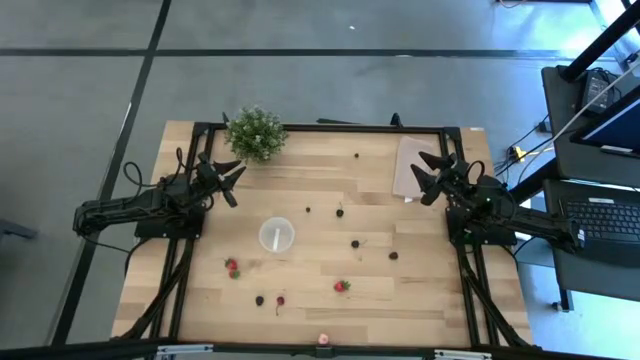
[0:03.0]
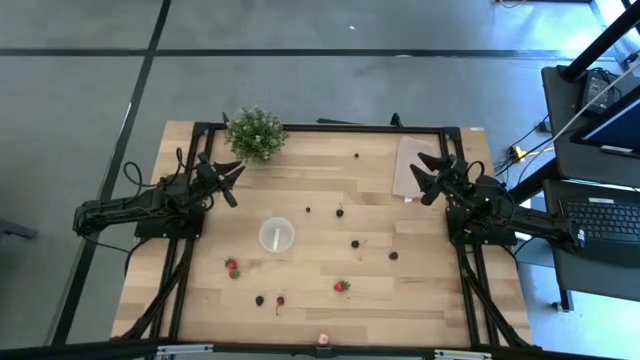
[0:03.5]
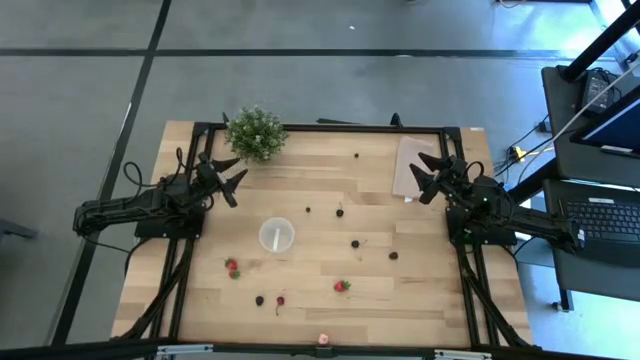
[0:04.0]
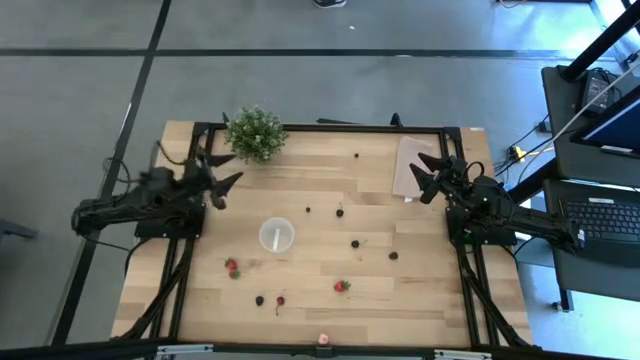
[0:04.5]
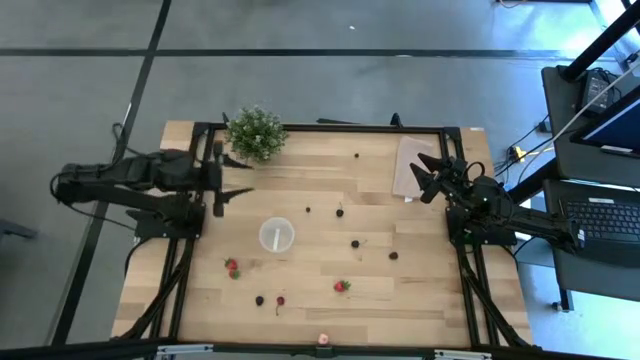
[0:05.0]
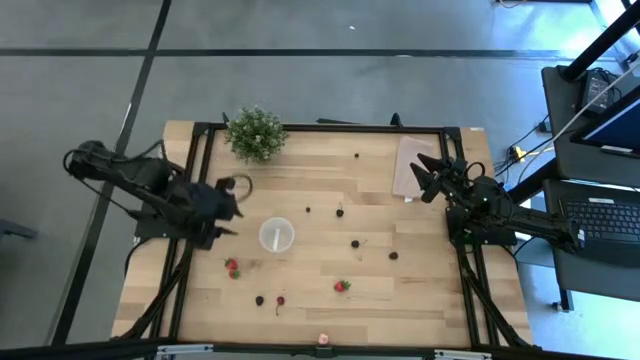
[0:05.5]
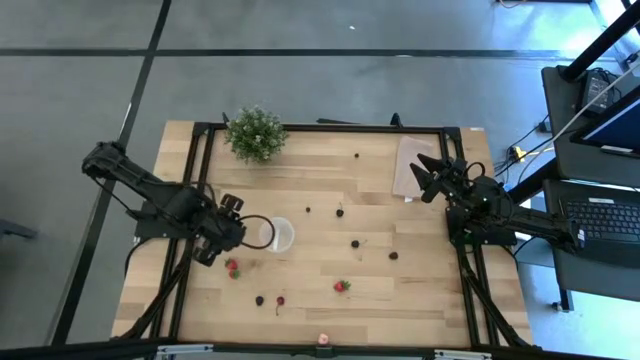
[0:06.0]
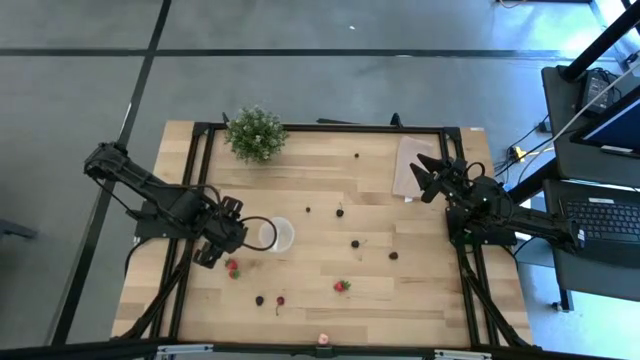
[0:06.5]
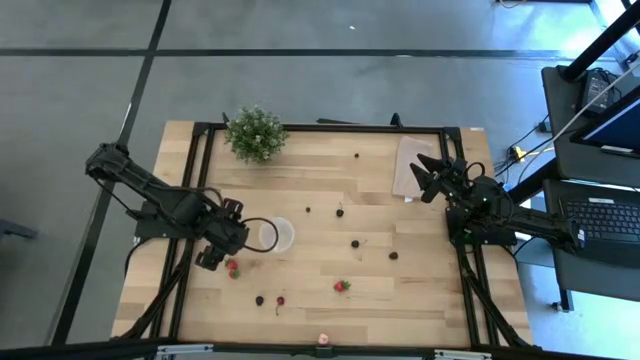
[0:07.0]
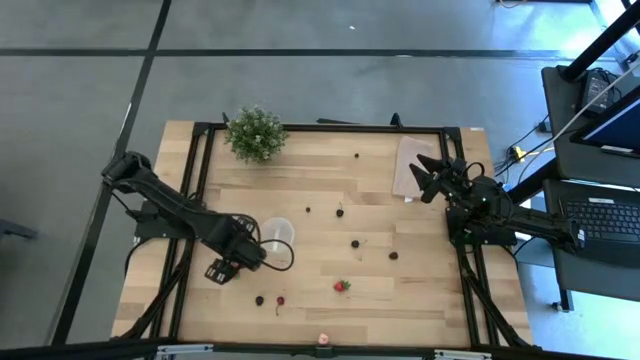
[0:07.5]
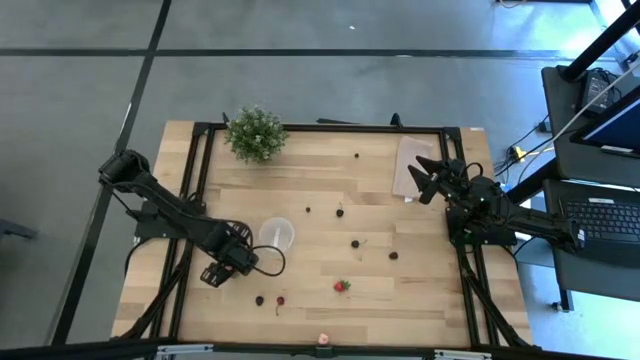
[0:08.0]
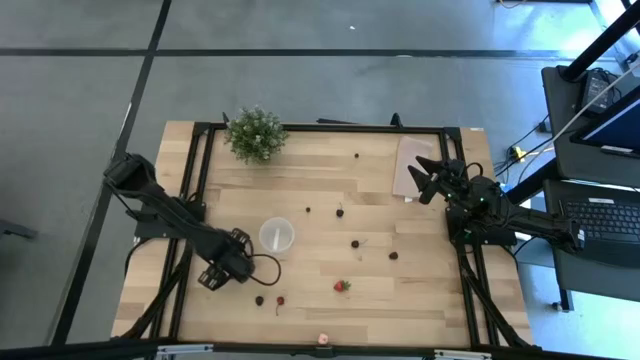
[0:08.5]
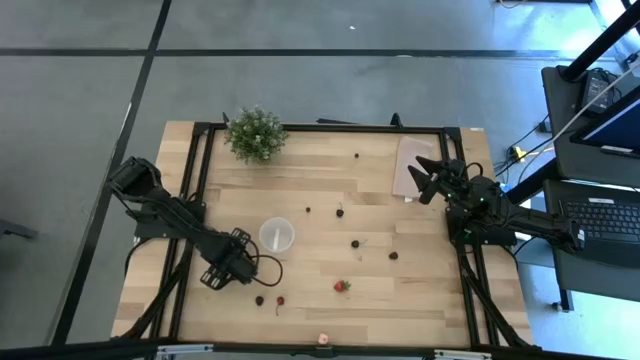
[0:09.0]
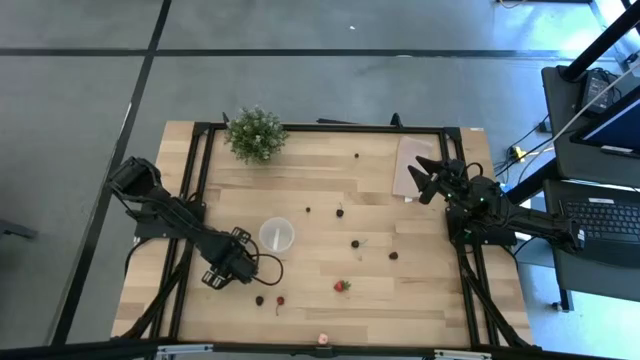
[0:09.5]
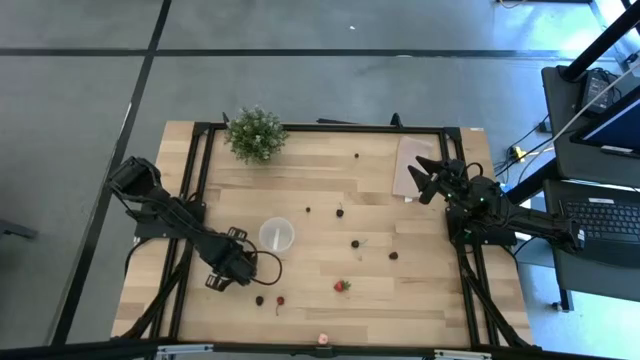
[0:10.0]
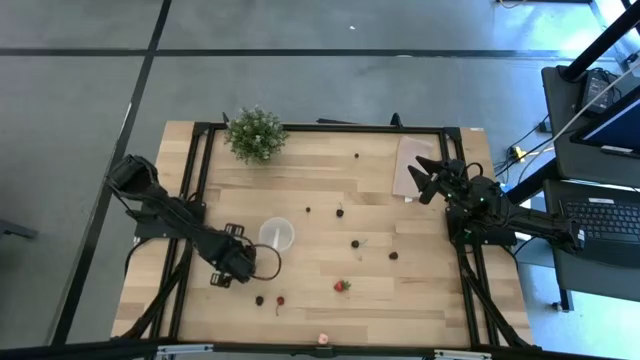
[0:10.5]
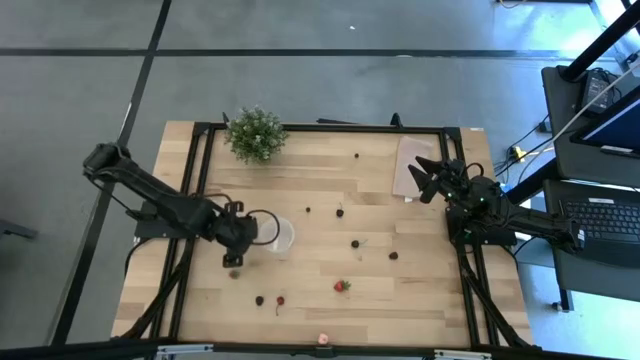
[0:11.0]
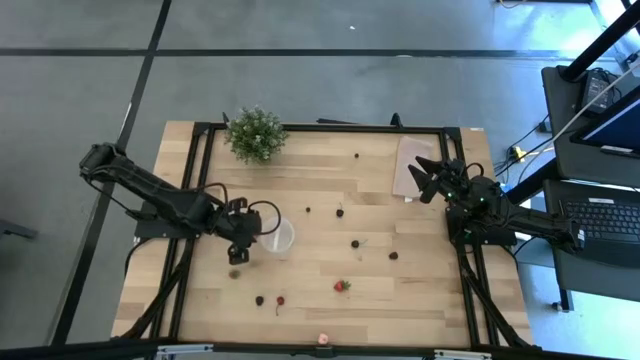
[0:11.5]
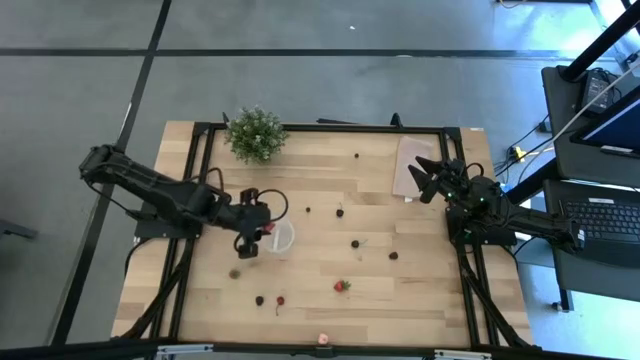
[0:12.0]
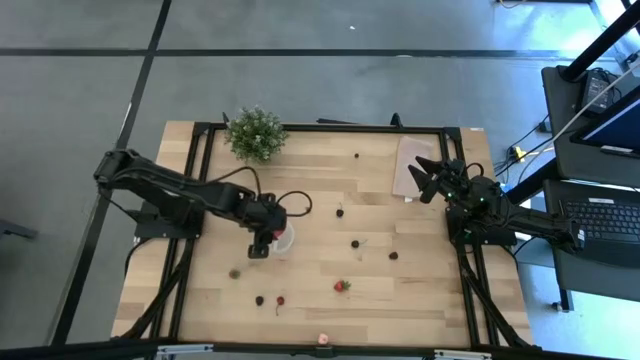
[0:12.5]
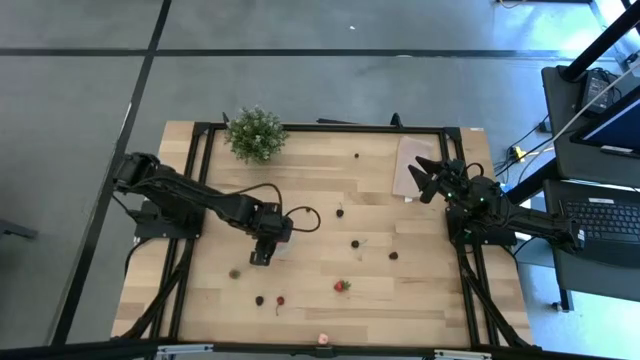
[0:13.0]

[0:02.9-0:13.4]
Task: Pick and placing Produce into tupperware
Put the red strawberry into the container

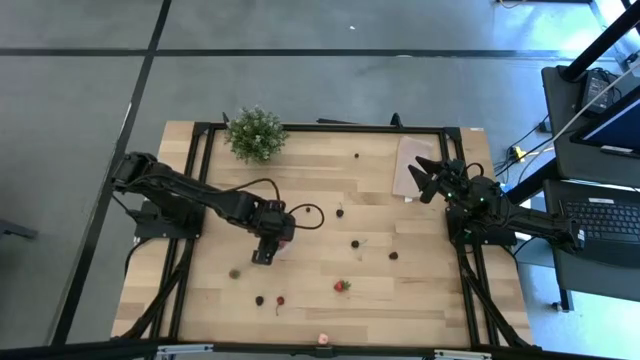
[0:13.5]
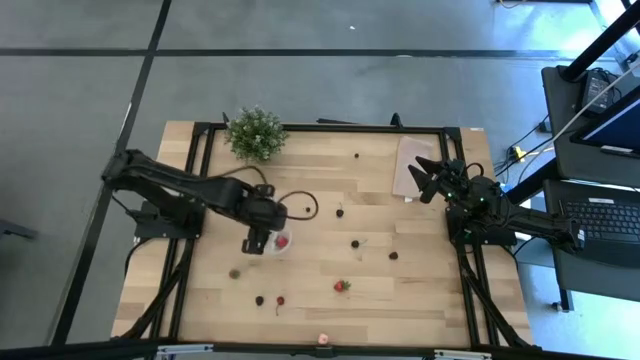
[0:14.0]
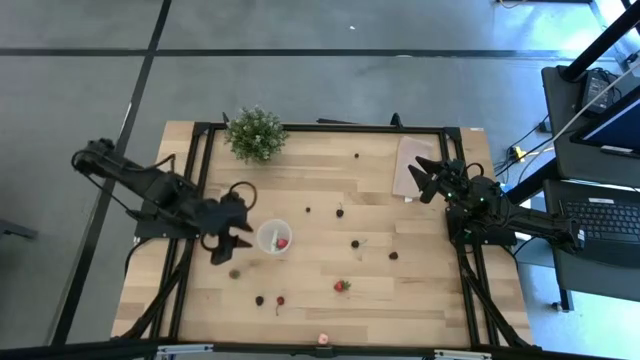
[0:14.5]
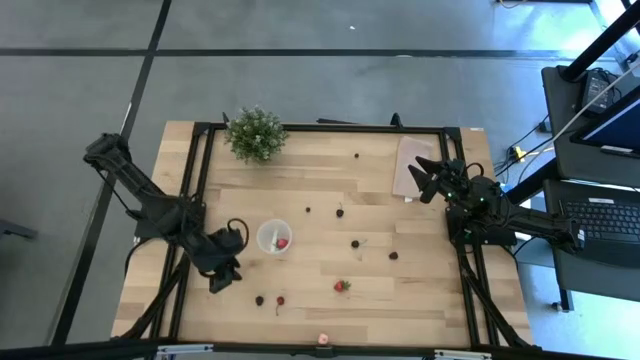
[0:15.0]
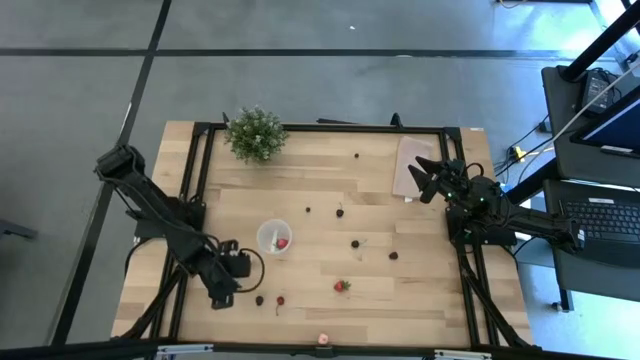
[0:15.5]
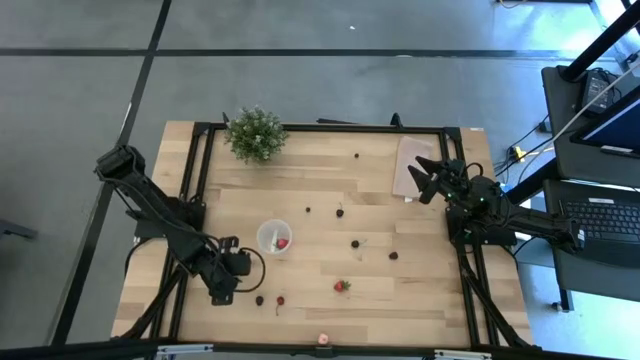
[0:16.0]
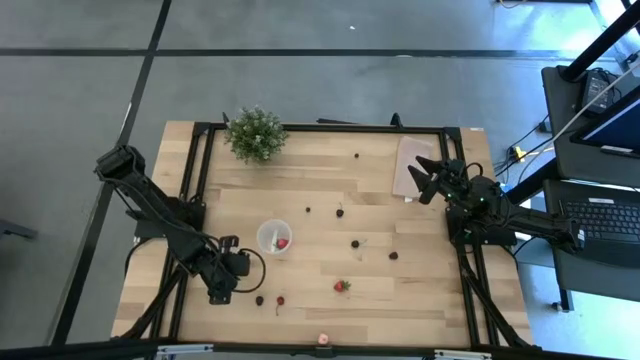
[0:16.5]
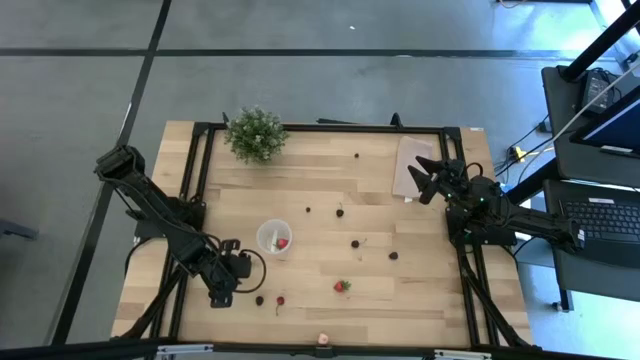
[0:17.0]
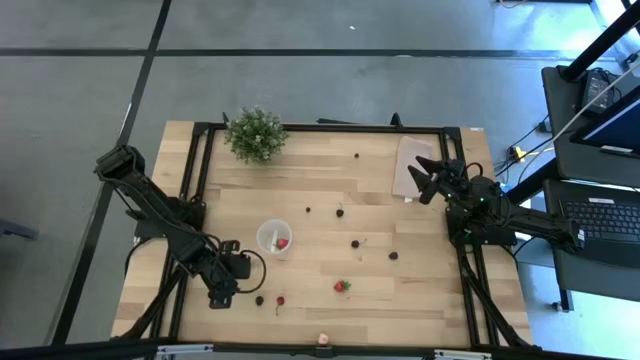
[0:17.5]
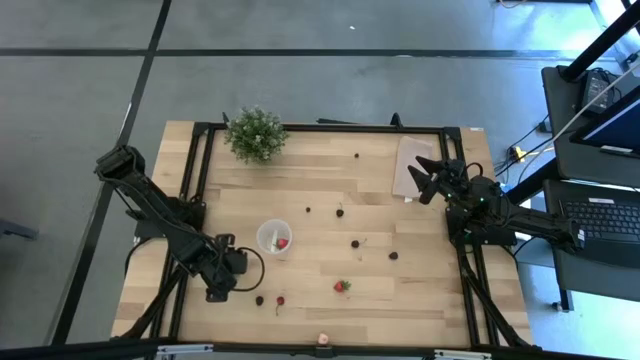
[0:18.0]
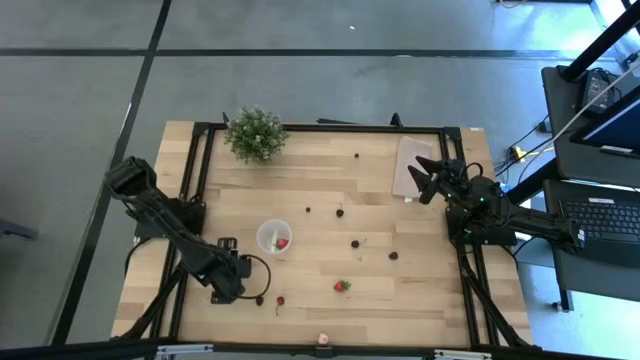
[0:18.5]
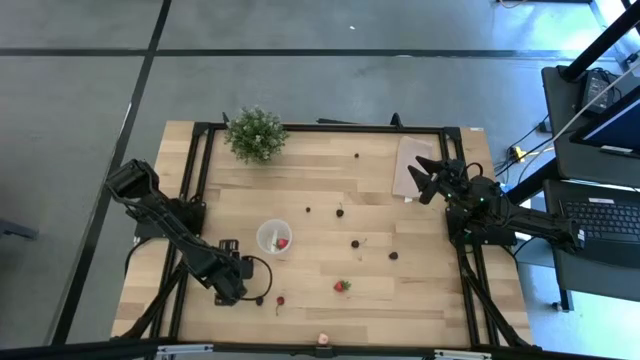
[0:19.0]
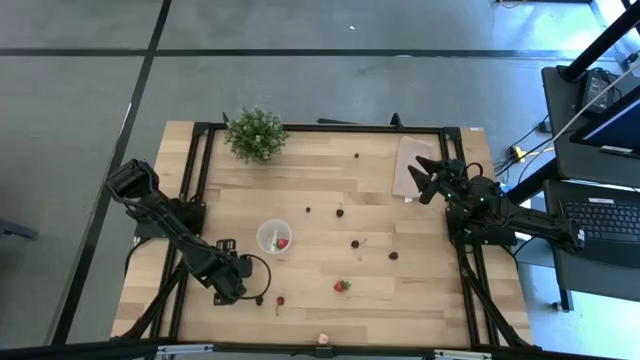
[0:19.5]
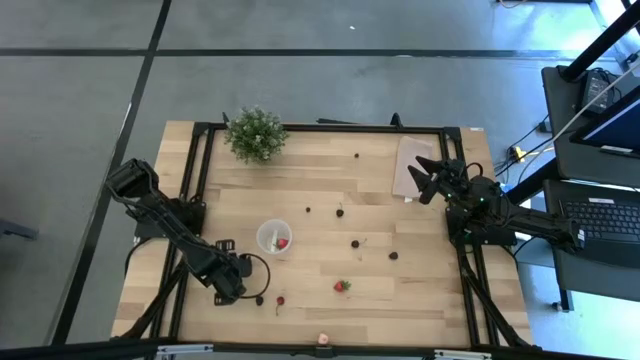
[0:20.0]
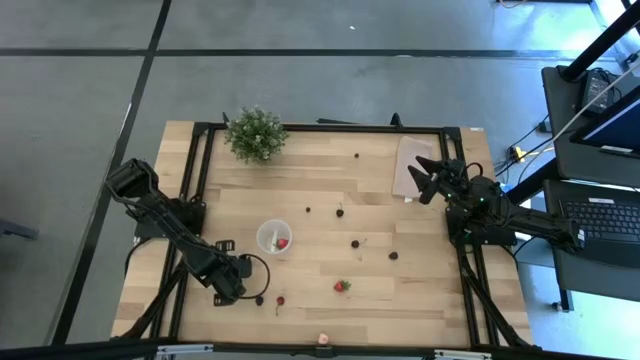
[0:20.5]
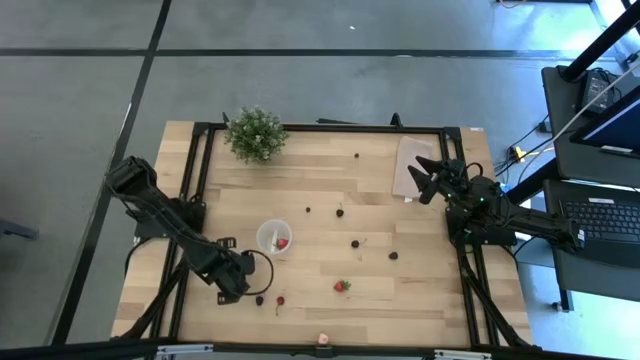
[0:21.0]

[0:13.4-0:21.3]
Put the red strawberry into the container

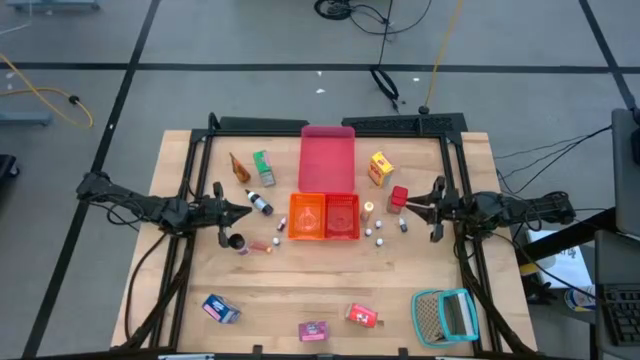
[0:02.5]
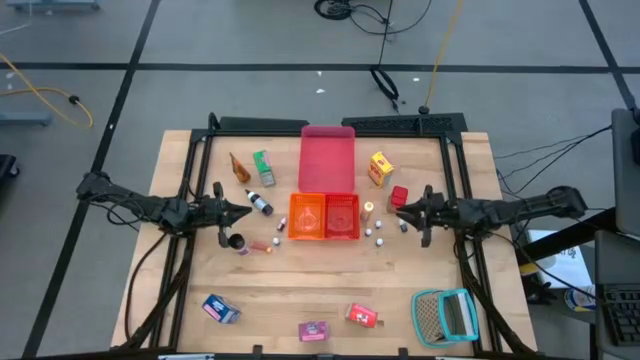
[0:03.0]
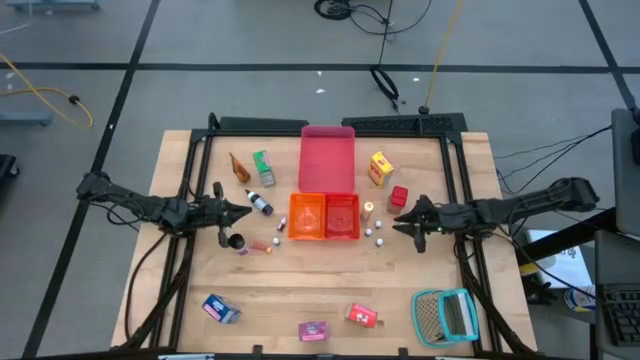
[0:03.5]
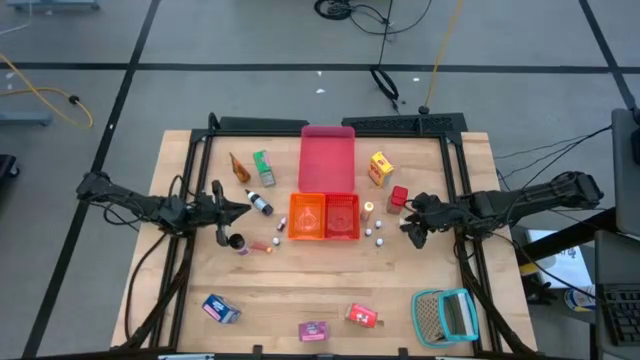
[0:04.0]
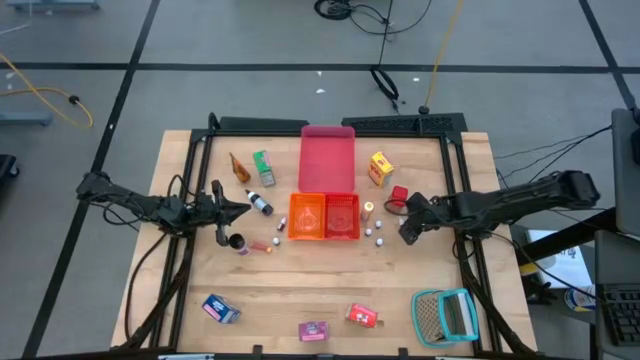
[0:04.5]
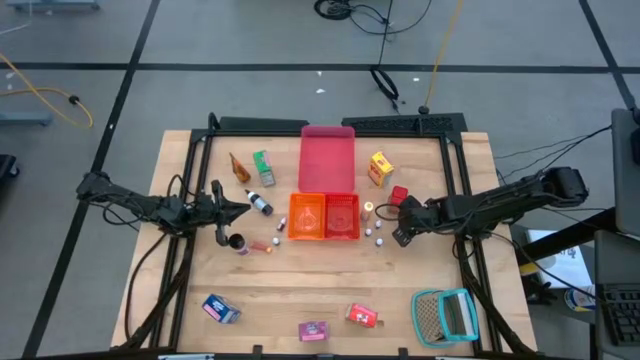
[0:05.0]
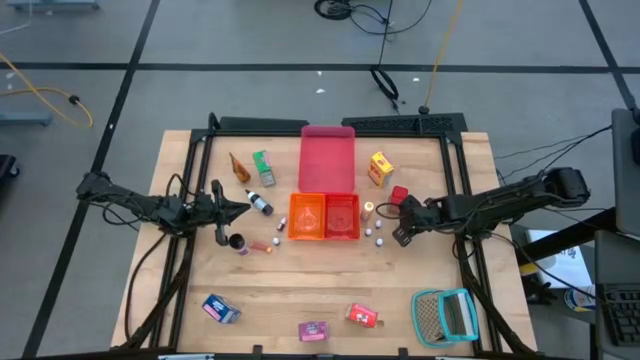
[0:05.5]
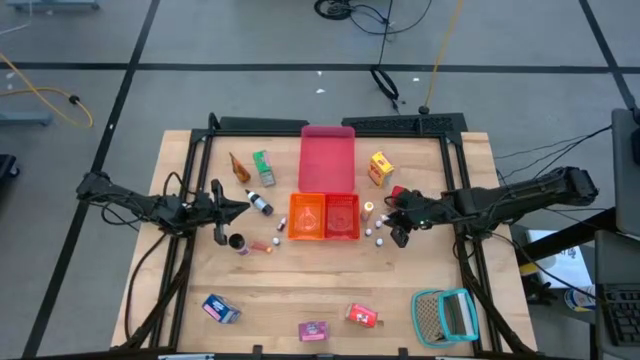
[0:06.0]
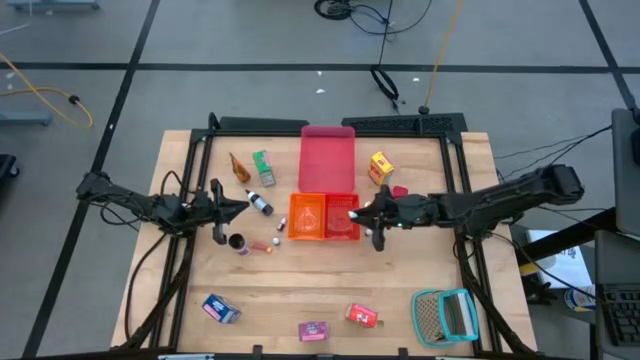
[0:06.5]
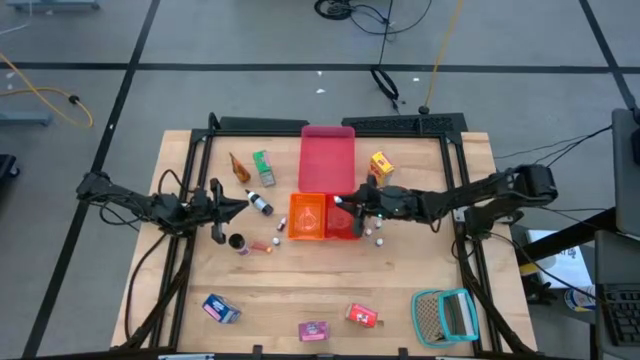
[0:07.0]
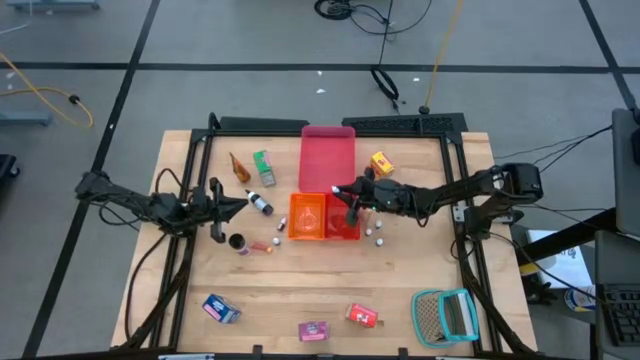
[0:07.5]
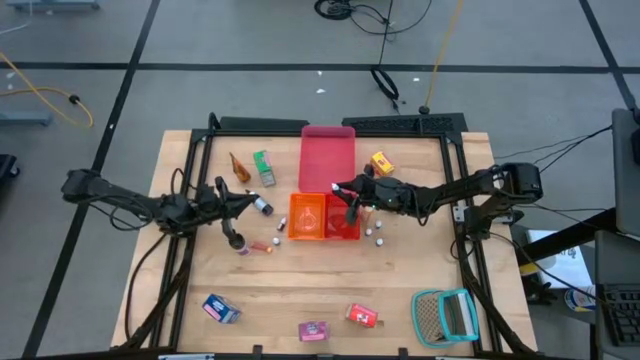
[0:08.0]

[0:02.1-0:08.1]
Task: Pick & Place Kitchen Items
Put the small black food coloring bottle into the red basket
